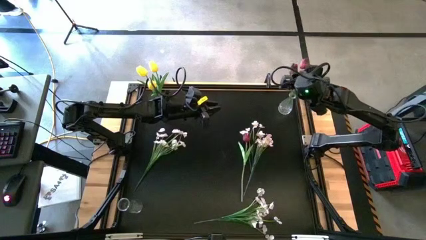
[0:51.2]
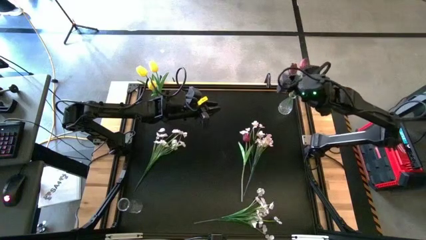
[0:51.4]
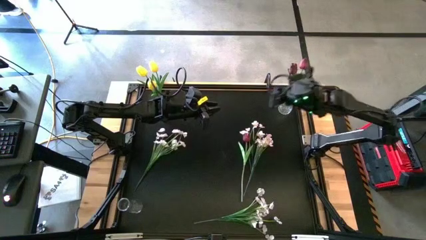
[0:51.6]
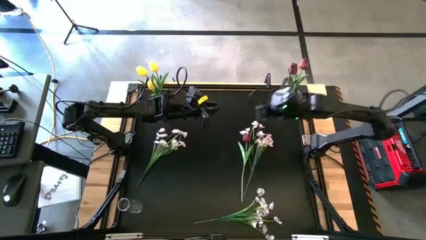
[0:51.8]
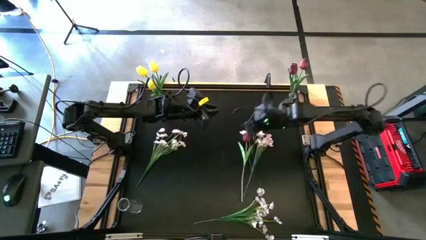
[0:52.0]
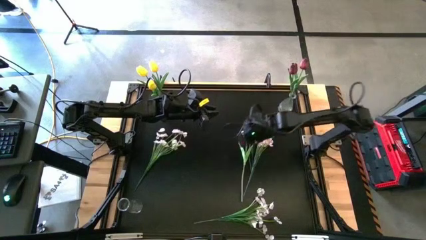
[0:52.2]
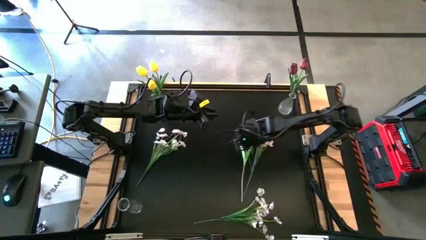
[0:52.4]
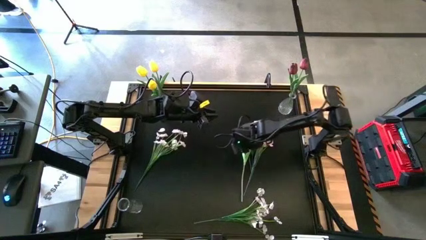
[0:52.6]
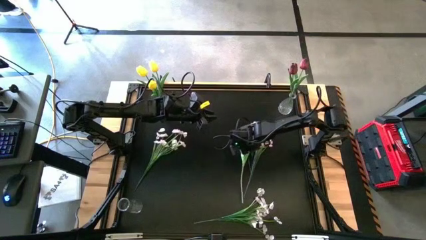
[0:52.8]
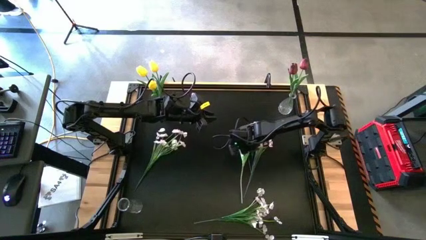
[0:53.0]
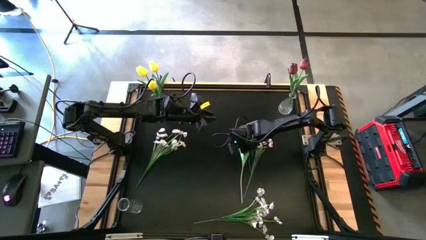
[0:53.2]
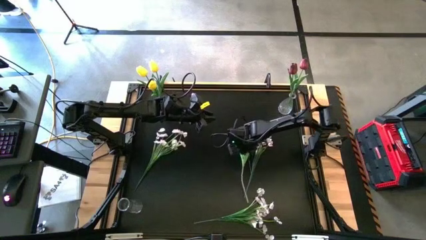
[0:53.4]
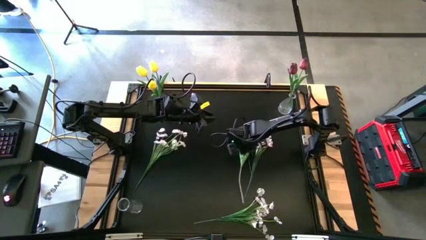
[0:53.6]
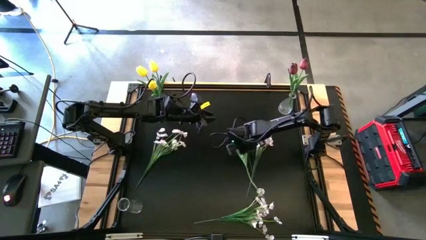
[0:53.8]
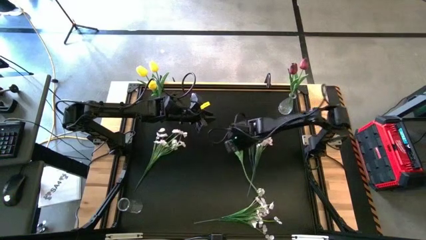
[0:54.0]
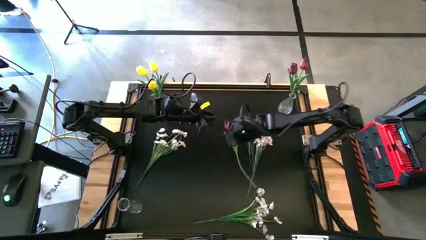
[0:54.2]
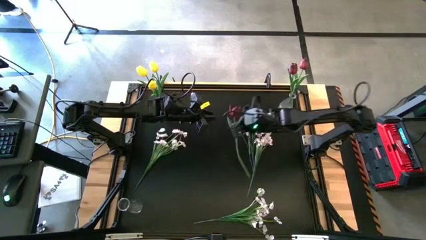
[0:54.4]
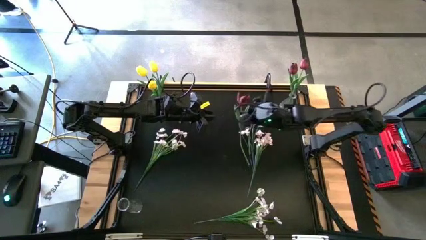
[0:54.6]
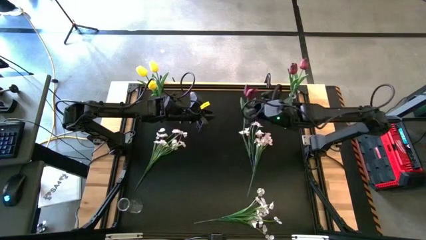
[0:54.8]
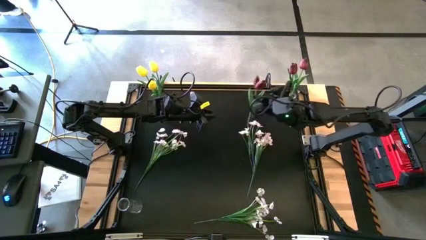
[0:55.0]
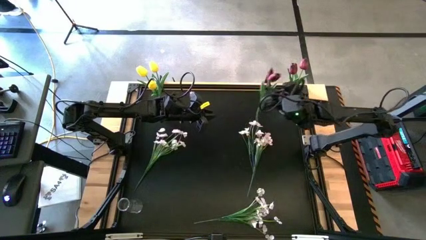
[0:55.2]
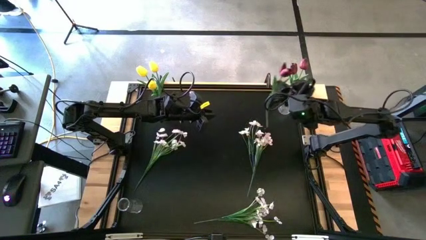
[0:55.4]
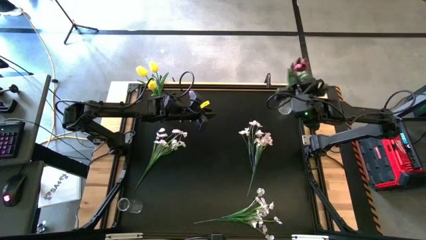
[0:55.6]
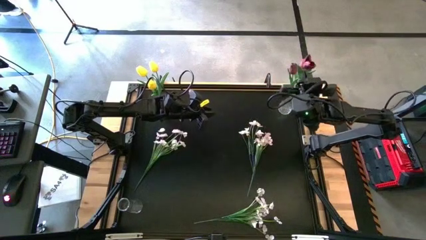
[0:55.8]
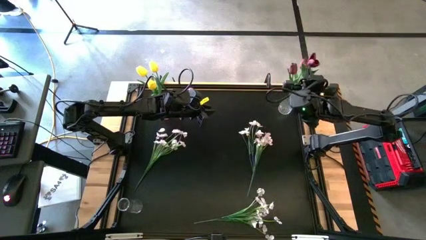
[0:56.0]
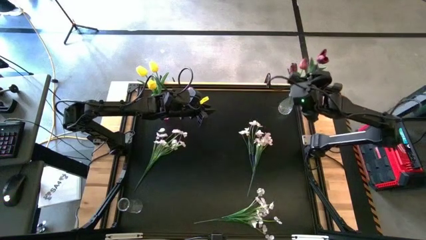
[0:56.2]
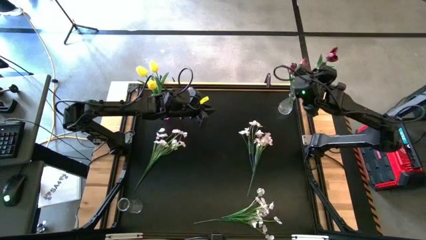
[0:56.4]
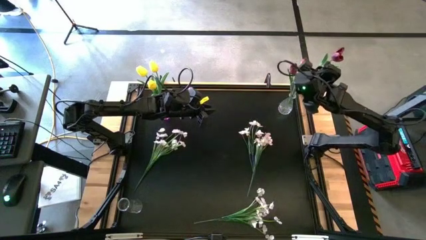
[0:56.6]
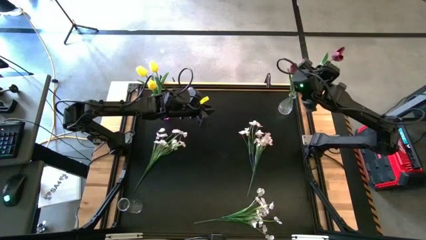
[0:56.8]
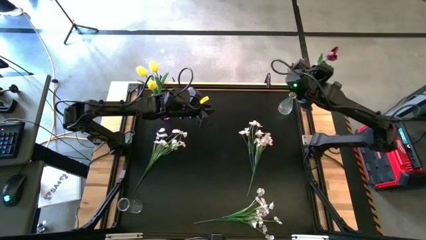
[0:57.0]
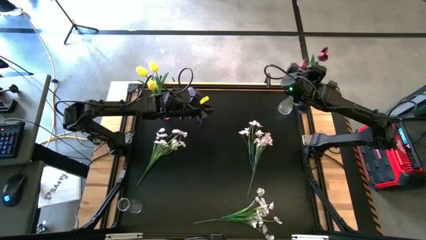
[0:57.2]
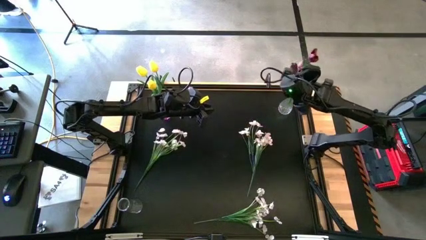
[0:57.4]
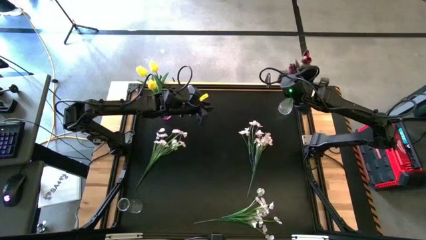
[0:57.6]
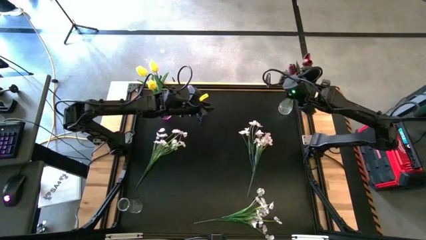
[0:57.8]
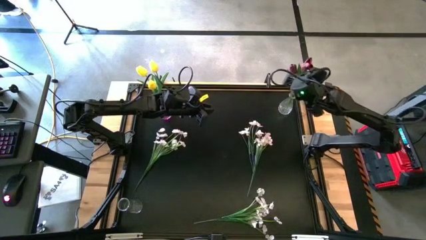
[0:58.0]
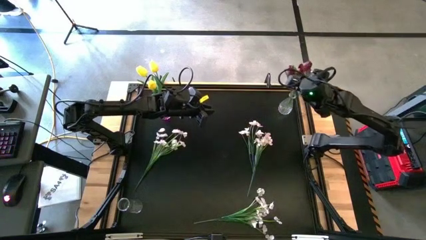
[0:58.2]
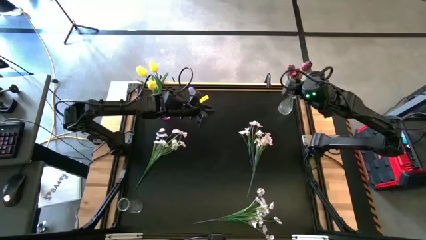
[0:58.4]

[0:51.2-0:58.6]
Task: Sort flowers into vase by color
Put the red flower into the top transparent vase

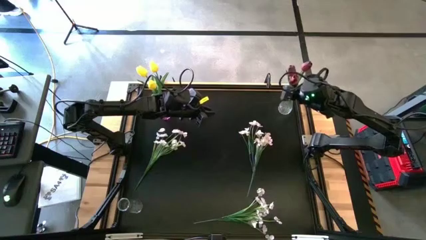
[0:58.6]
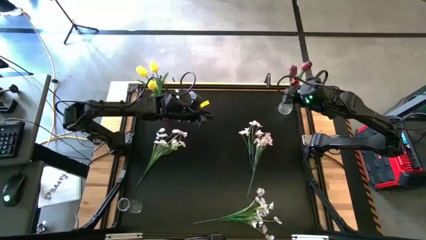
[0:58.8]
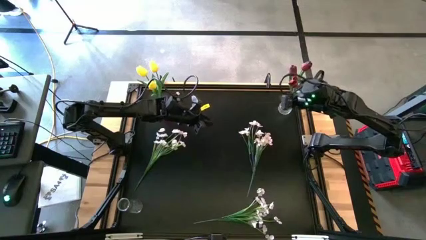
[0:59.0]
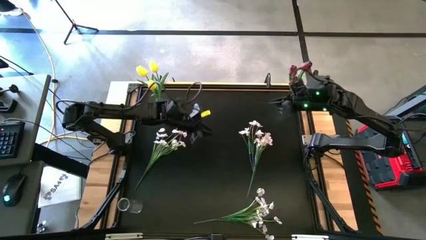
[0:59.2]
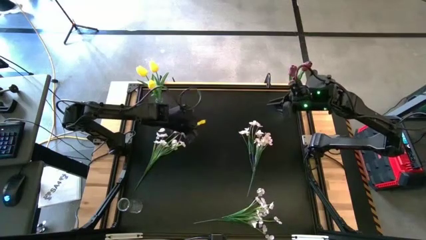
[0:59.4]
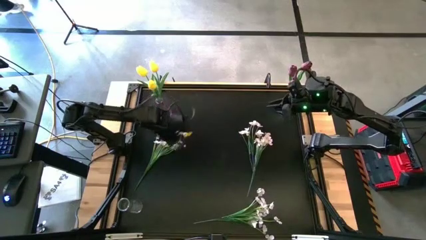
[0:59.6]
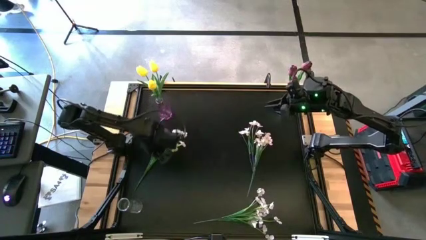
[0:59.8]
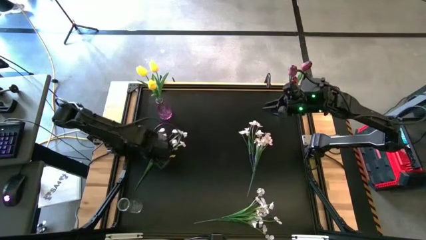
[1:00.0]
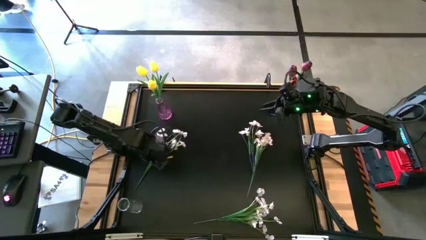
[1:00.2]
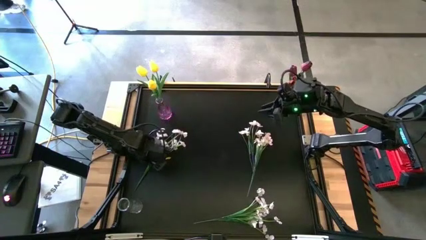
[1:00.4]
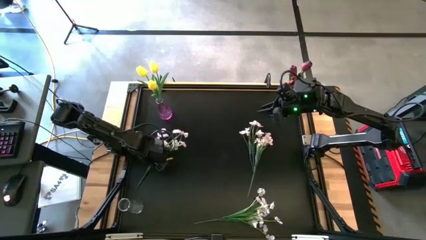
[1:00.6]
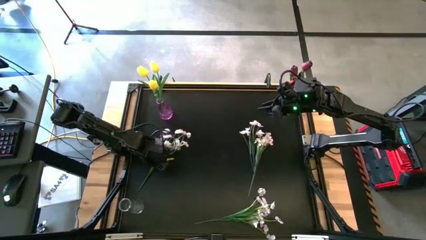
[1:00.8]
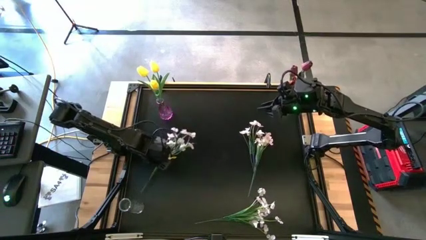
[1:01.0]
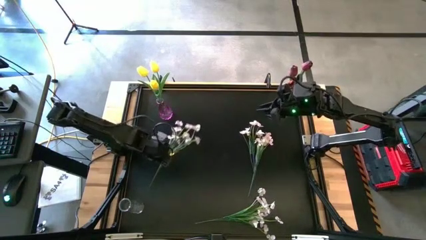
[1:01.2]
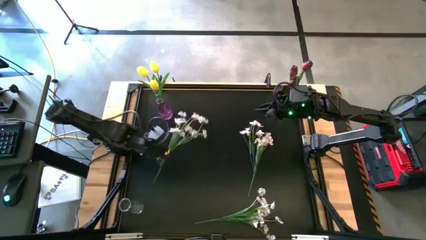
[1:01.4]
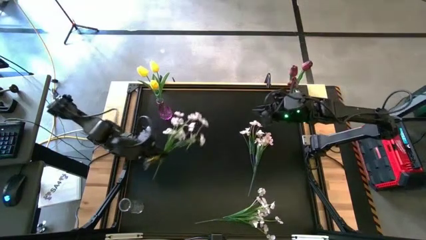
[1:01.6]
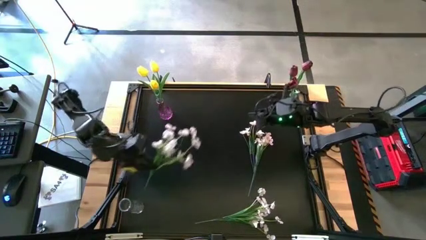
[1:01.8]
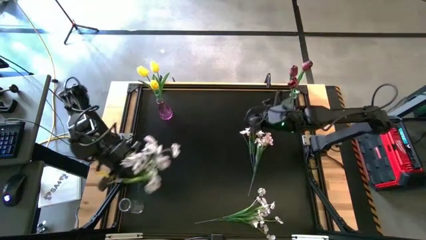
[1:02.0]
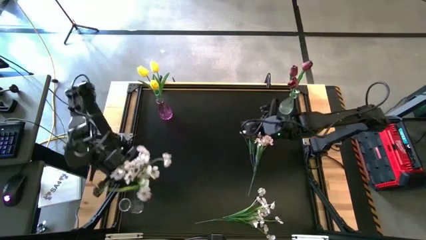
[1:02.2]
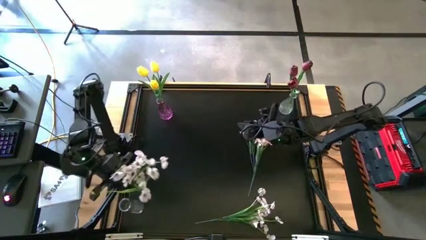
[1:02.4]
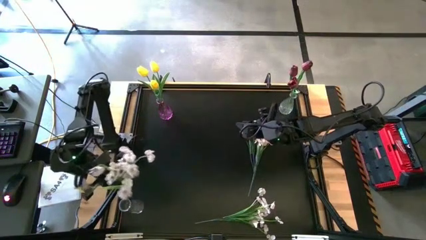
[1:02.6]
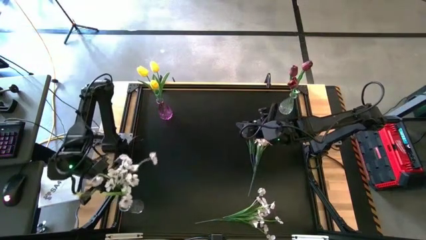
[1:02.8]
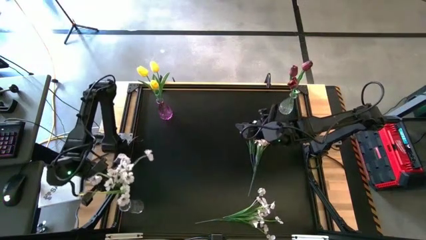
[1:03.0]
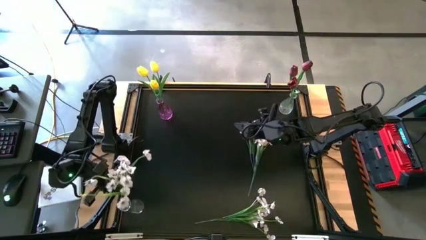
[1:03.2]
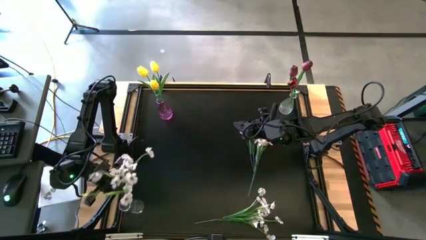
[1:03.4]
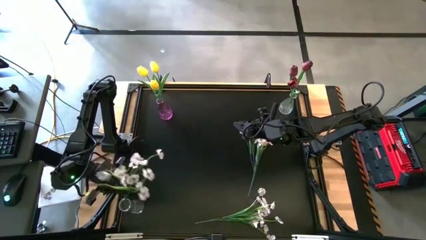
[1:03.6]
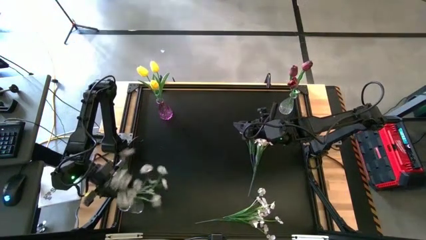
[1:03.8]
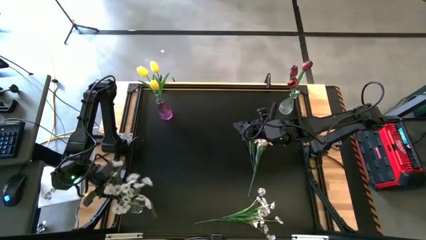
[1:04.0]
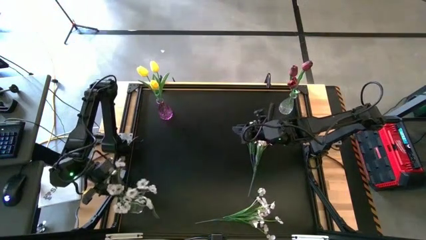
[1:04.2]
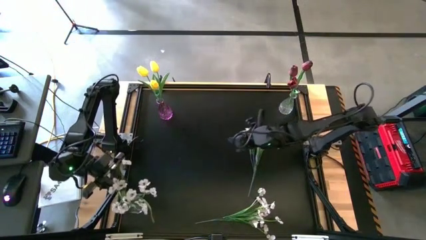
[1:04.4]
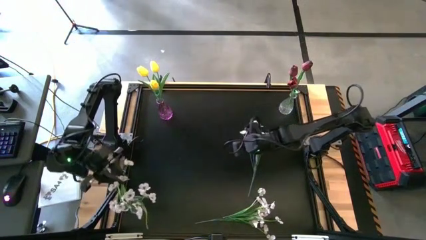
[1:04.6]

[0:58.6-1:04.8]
Put the left white flowers into the bottom transparent vase

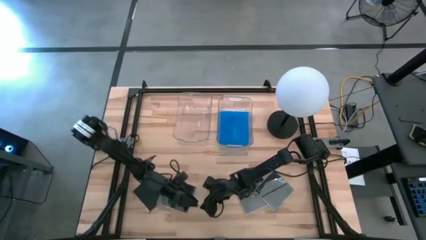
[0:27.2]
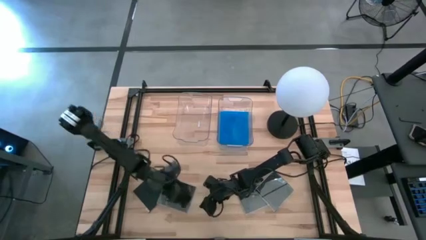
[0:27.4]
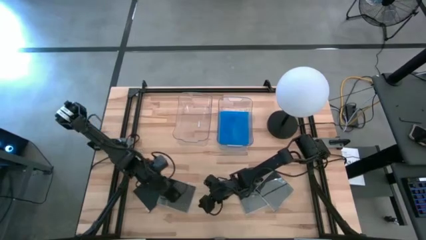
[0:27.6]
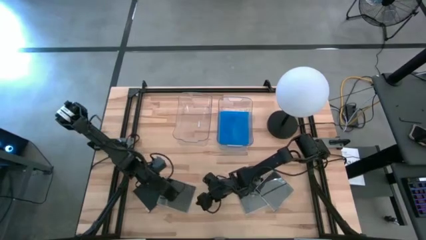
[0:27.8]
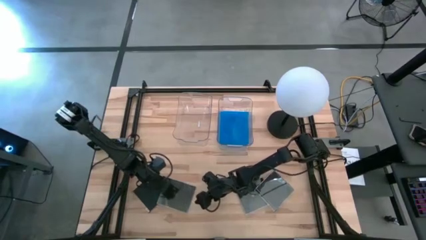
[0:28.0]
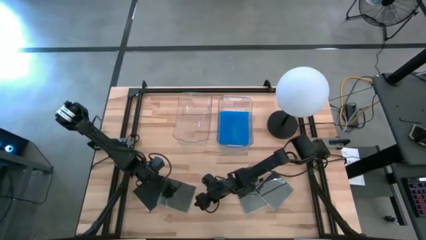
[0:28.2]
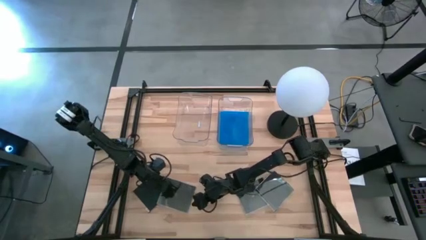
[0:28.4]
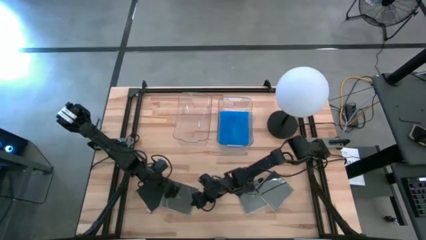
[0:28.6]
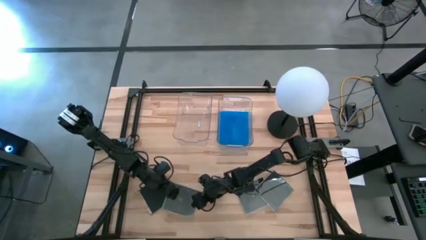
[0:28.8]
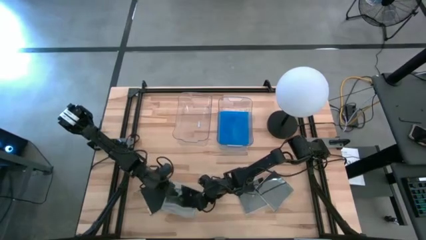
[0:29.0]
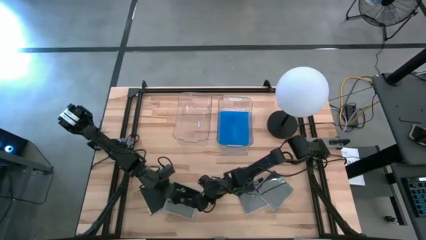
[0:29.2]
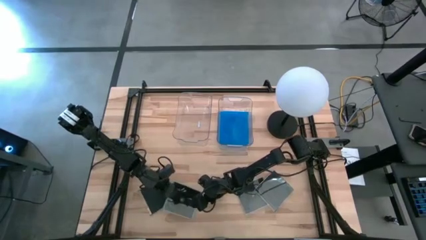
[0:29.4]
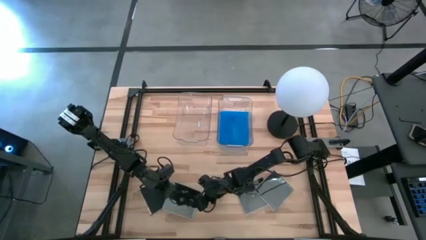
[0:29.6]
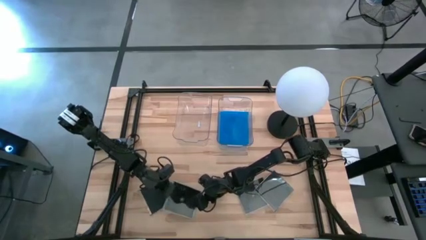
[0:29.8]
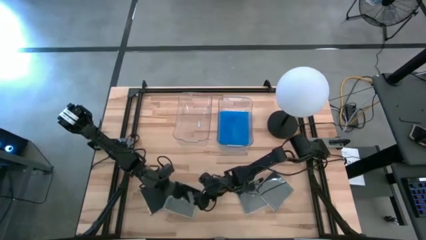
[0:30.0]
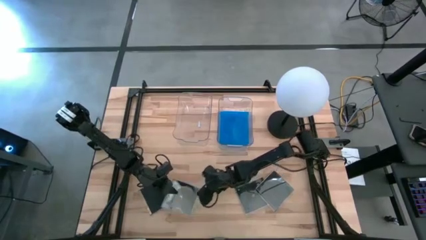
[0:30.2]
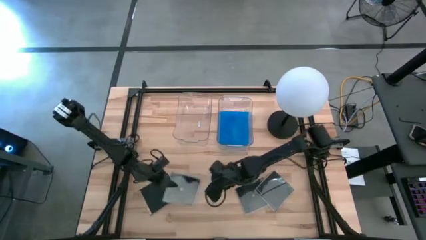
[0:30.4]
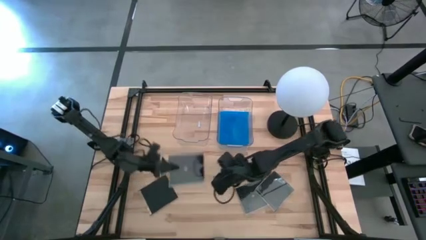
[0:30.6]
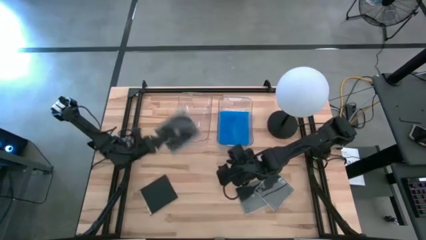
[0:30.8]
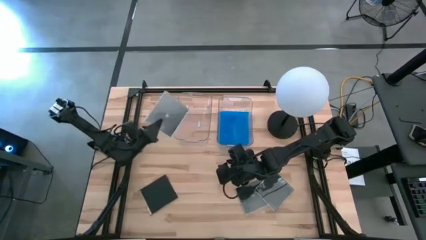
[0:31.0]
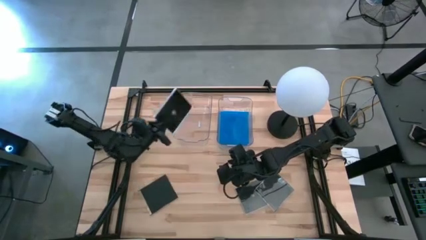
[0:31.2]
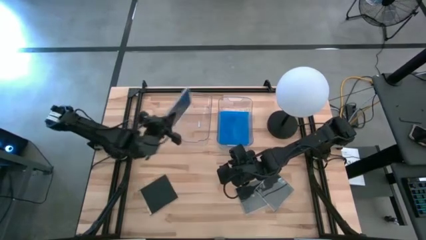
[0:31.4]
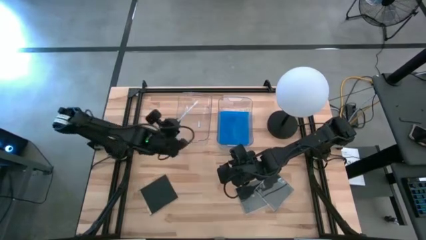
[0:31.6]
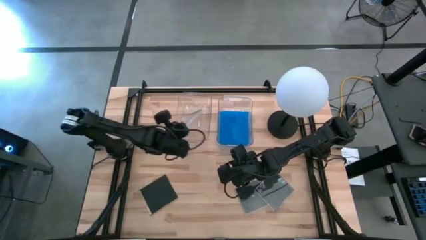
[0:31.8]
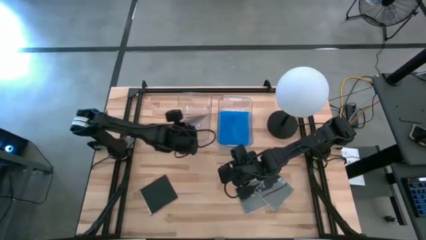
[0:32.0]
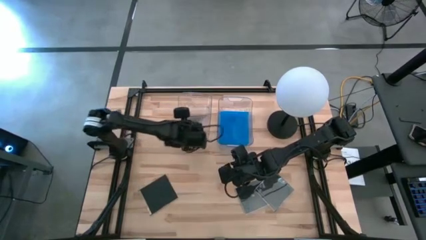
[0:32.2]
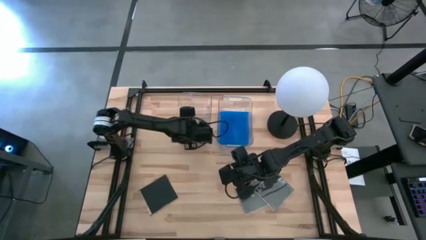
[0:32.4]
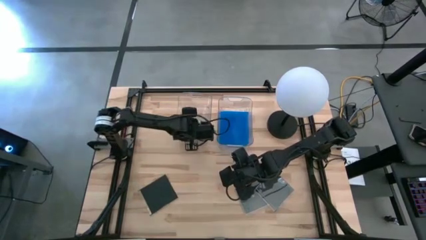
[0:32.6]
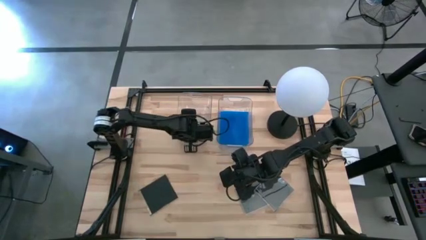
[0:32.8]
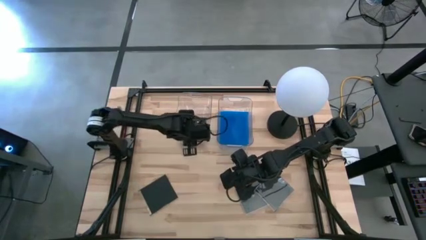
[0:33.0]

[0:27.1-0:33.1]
Task: Pick & place jewel cases by type
Put the black cd case into the left transparent bin
